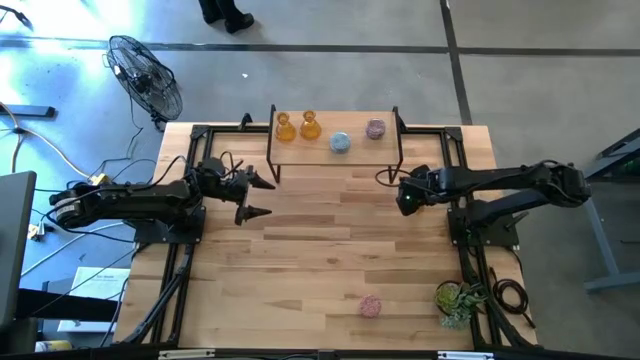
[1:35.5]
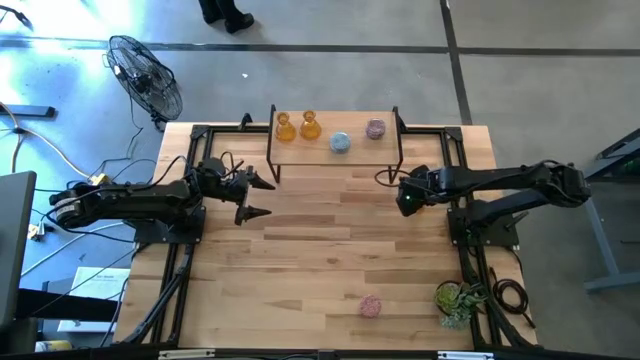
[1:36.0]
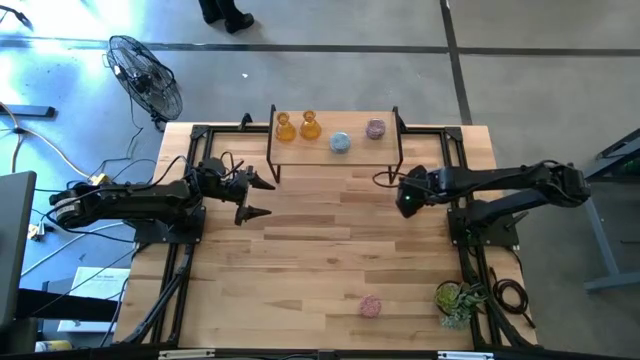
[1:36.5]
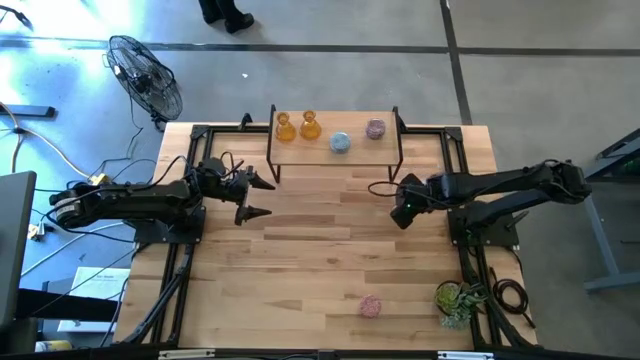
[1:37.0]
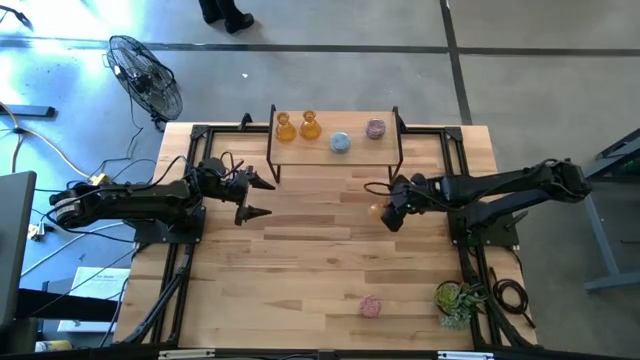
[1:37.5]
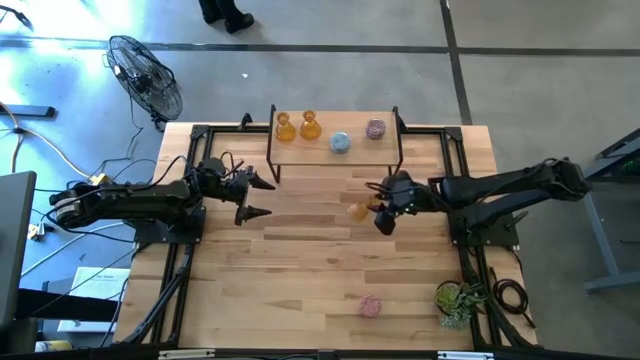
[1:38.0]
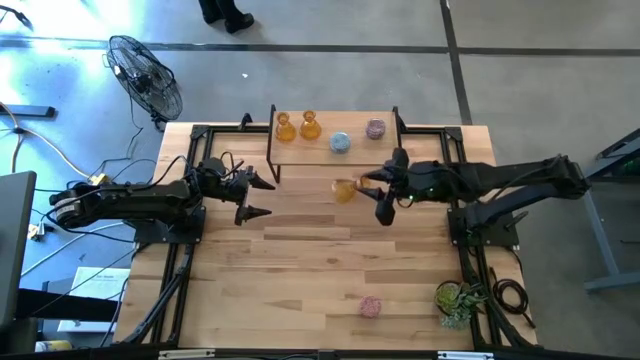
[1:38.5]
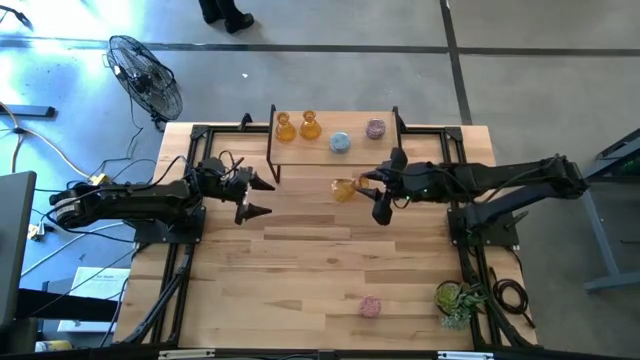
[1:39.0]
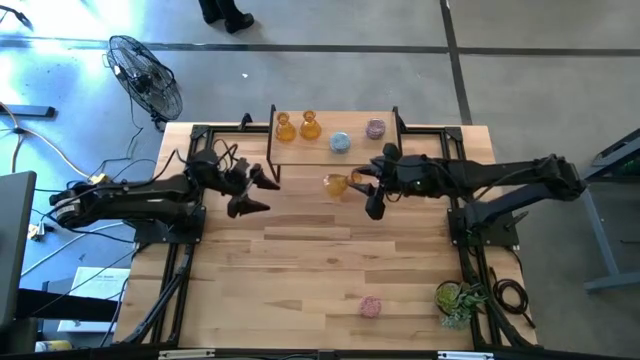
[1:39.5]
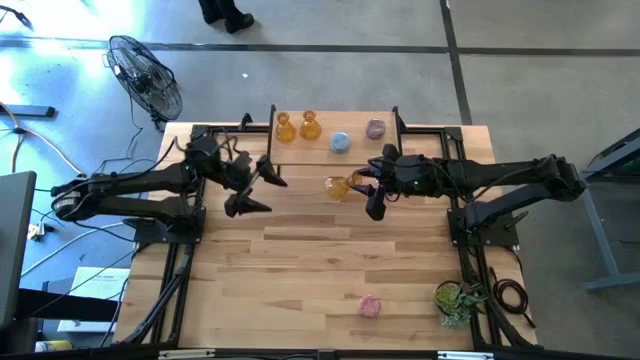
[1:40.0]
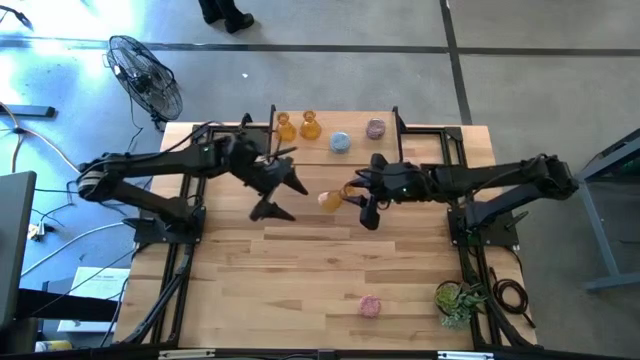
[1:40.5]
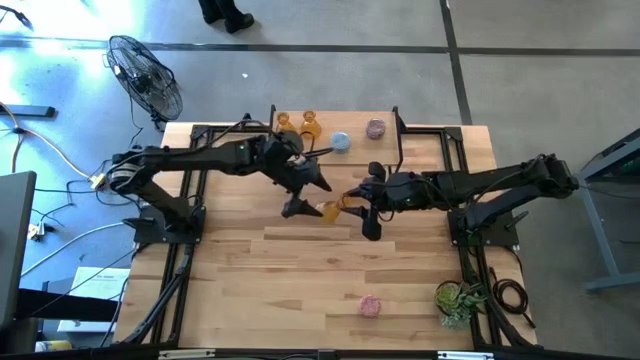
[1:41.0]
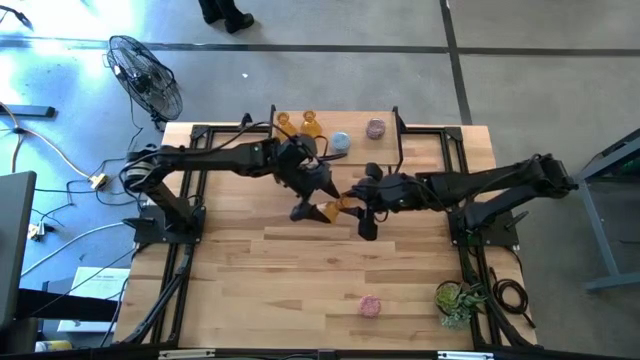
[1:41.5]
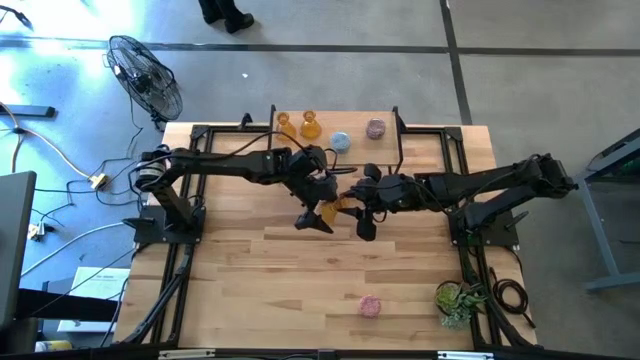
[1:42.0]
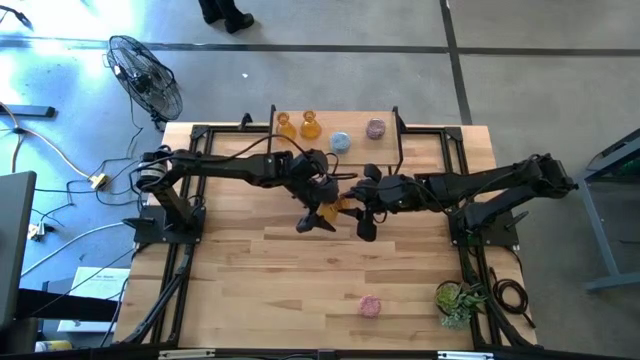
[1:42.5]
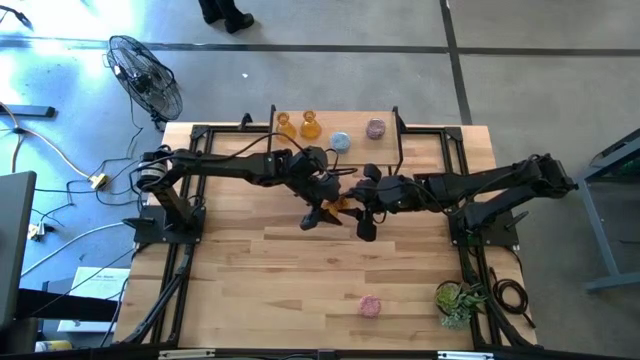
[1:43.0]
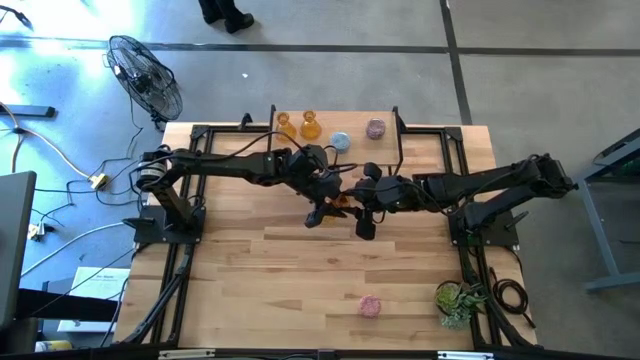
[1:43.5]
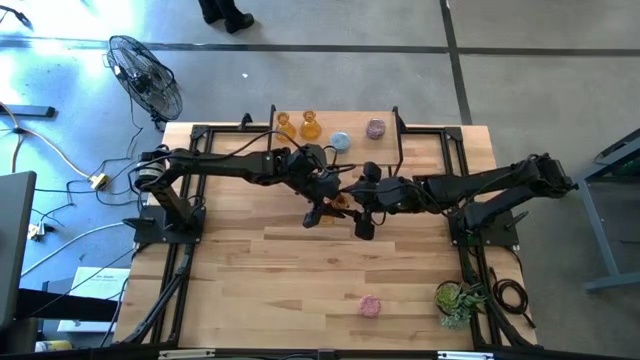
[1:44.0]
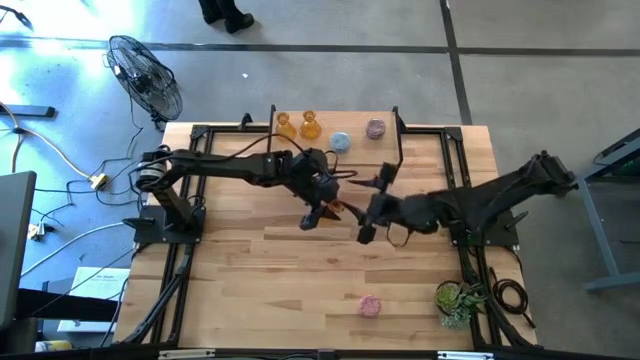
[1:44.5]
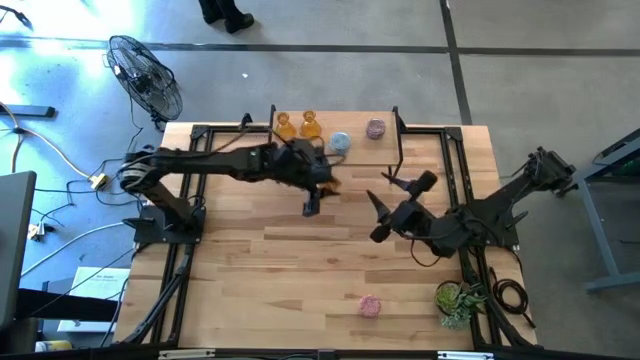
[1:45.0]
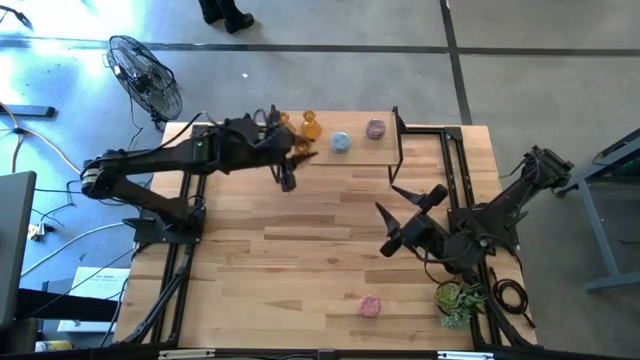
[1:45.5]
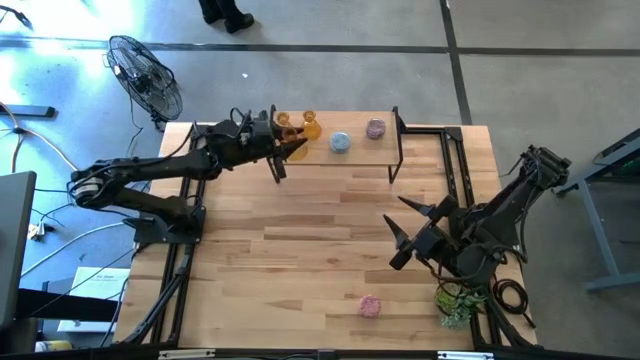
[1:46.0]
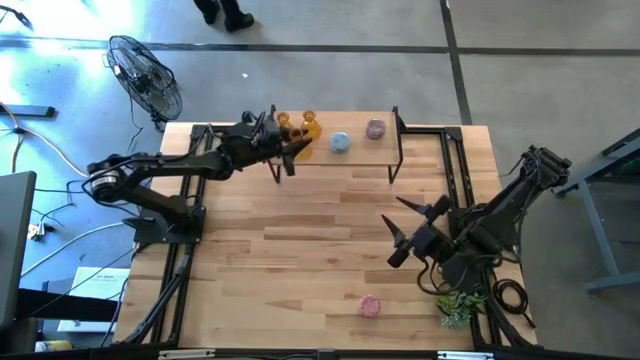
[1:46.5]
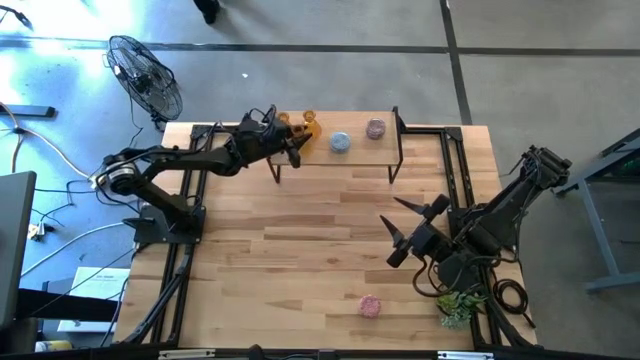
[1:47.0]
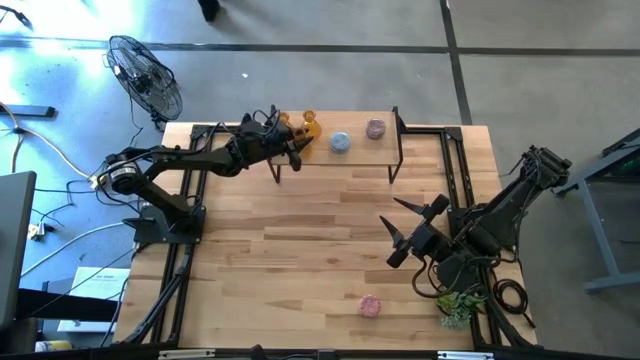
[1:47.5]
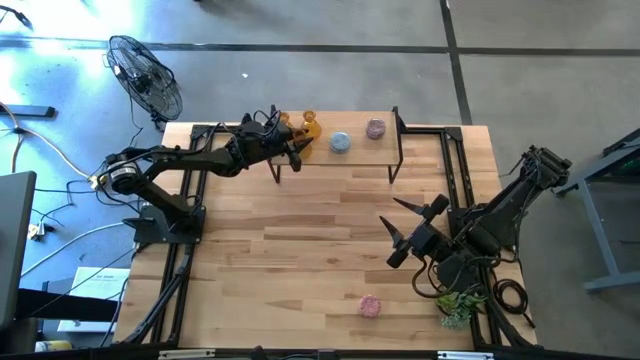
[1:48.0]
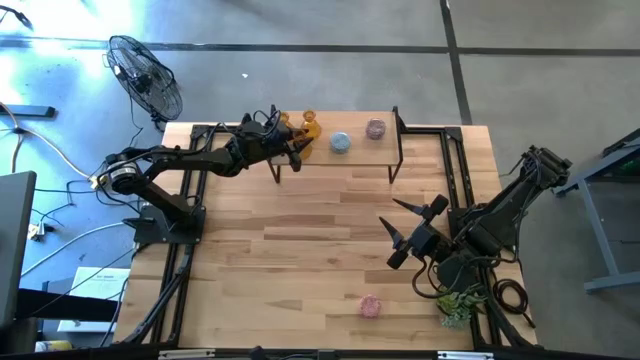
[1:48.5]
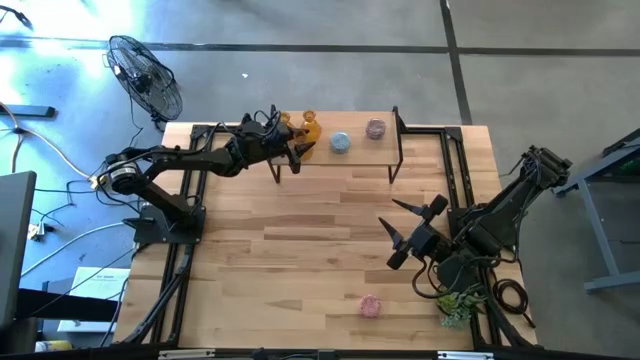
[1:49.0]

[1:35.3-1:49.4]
Task: Pick & Place candle stick holders
Put the orange candle holder on the shelf

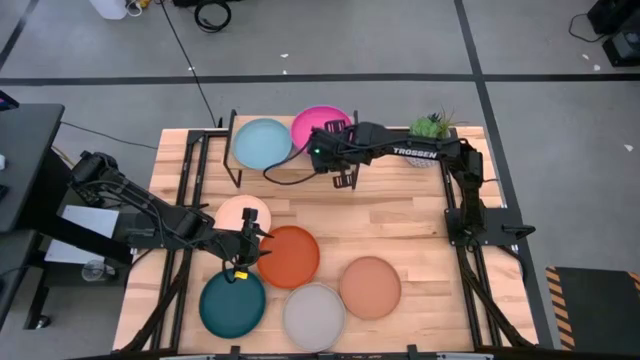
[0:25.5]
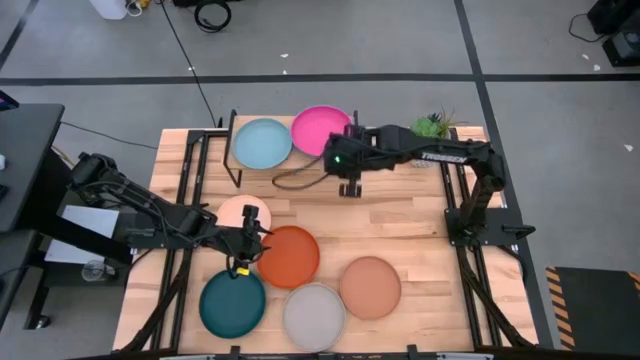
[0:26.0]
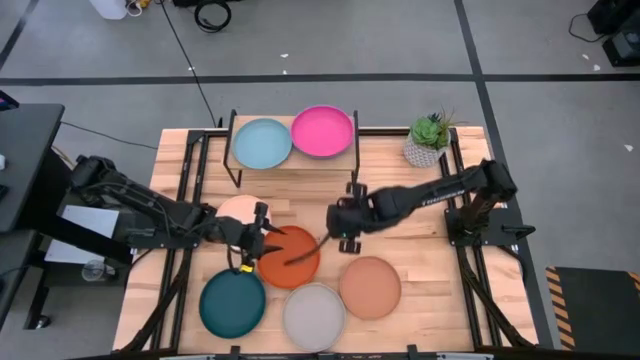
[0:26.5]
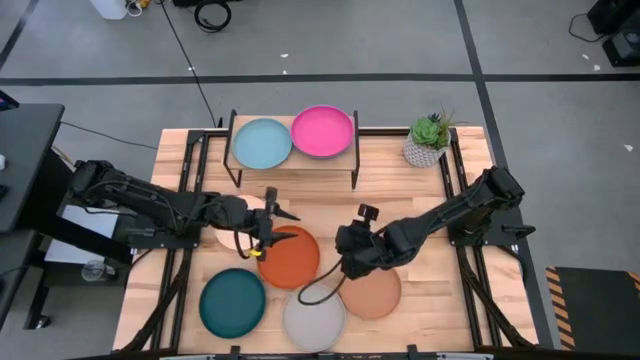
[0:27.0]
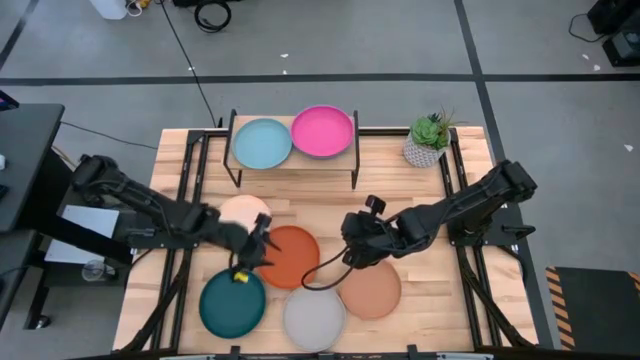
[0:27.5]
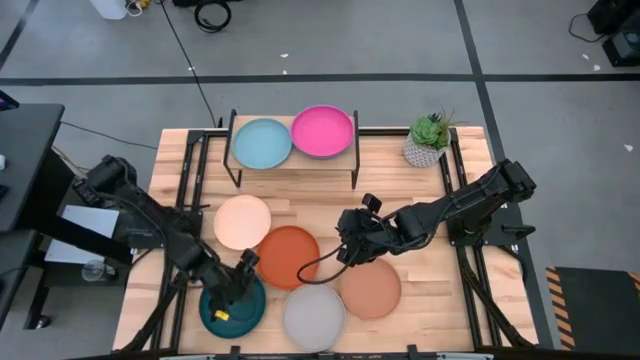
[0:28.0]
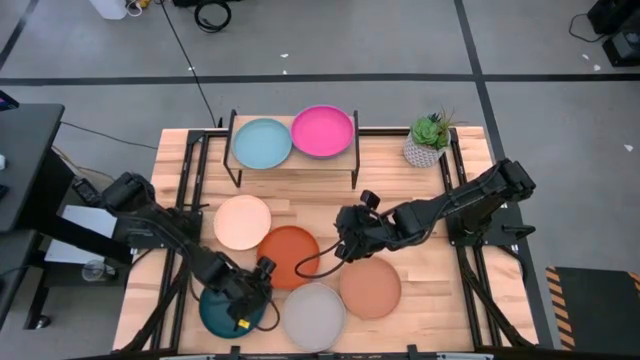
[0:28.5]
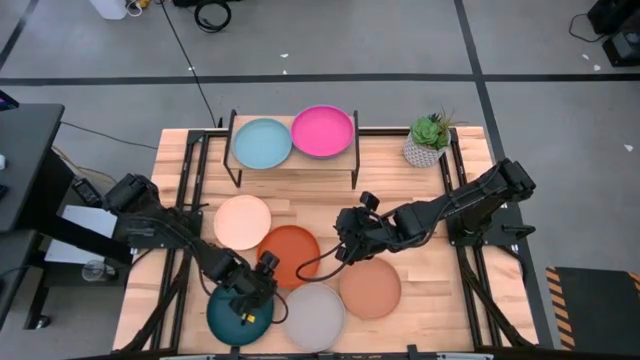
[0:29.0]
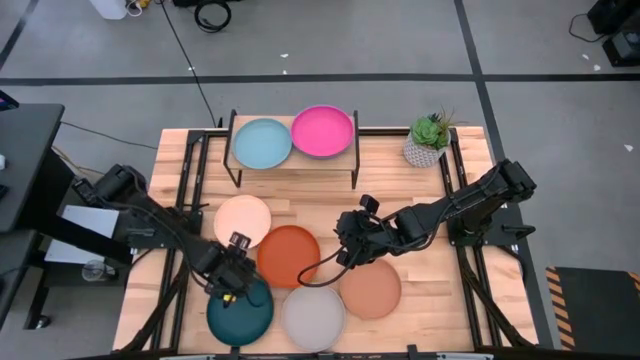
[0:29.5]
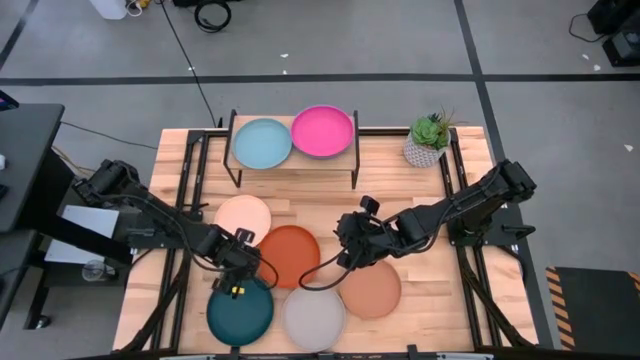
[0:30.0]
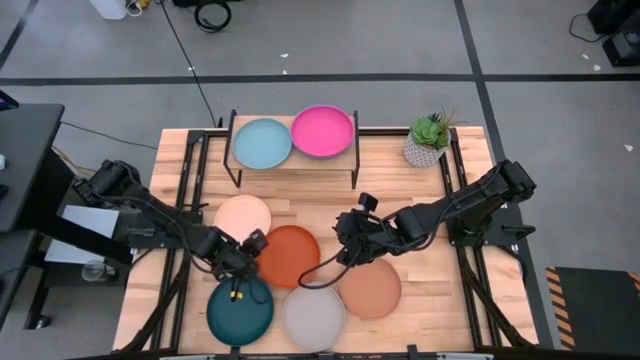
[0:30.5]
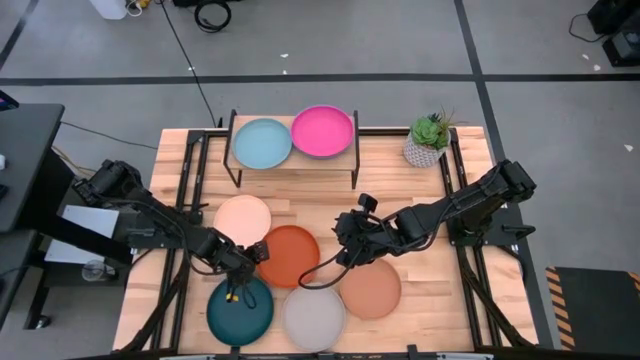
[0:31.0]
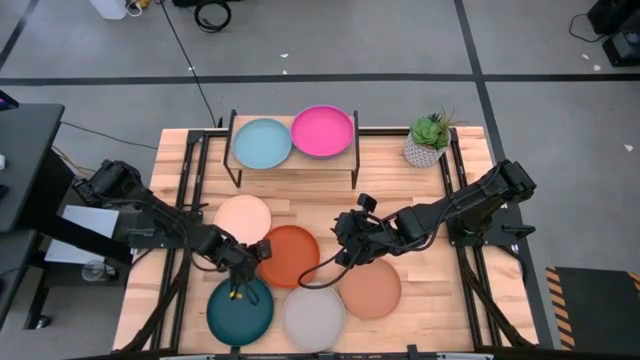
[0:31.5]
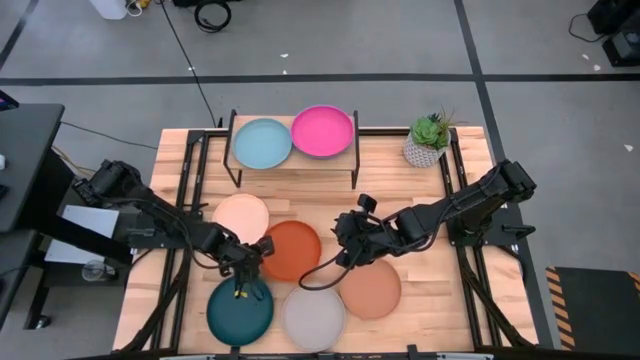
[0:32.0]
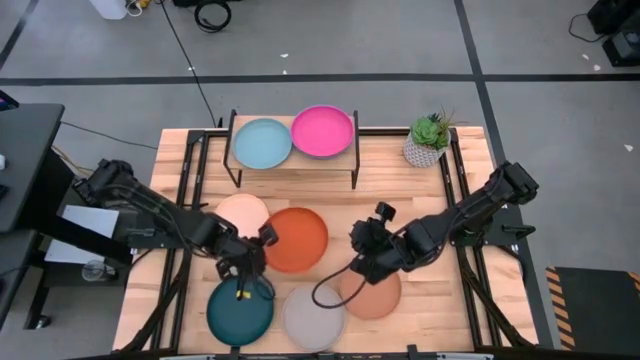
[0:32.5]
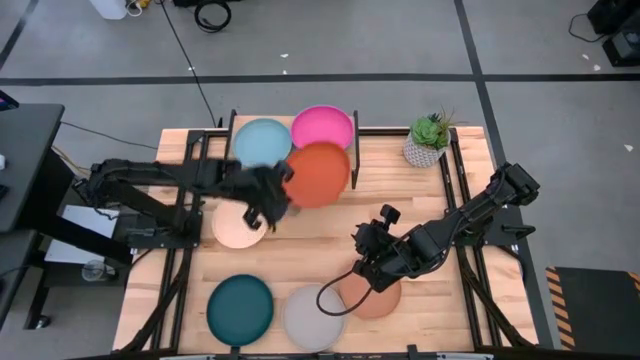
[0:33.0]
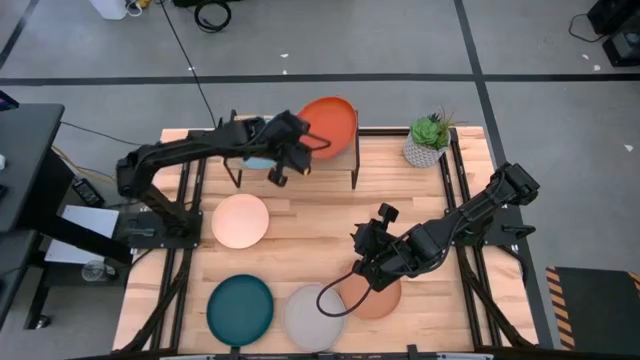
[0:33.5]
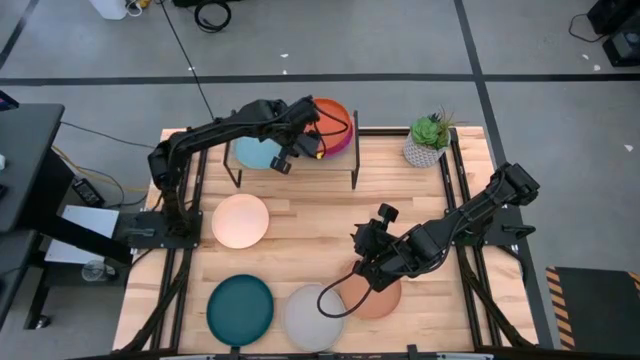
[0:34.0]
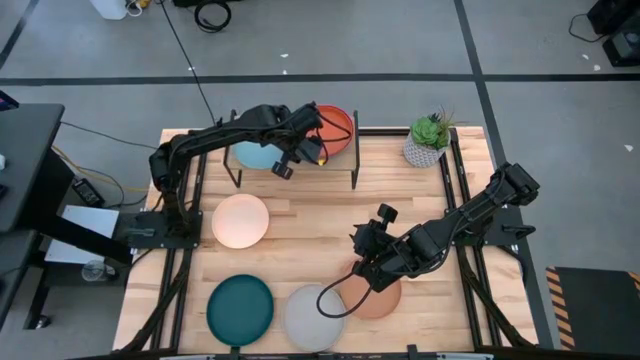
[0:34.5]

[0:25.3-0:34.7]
Task: Place and stack plates onto a shelf
Stack the orange plate on top of the pink plate on the shelf
